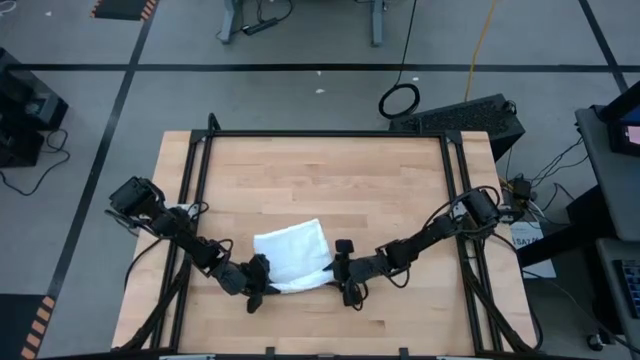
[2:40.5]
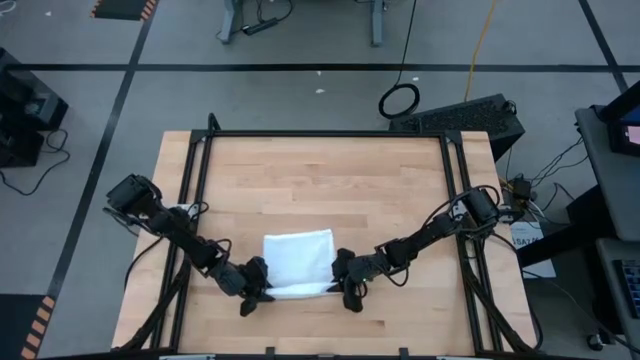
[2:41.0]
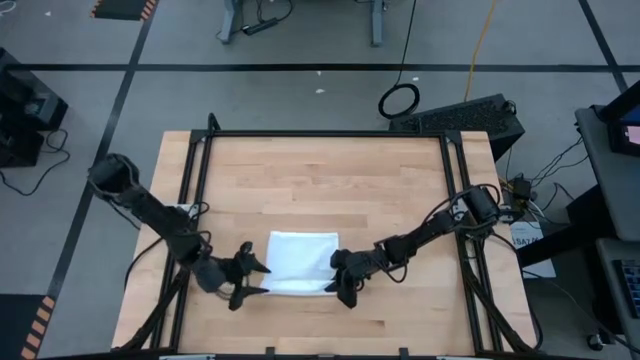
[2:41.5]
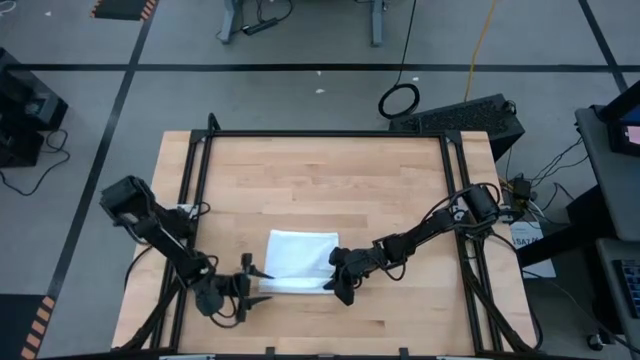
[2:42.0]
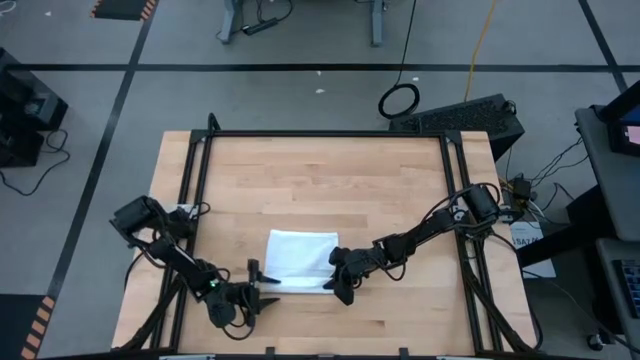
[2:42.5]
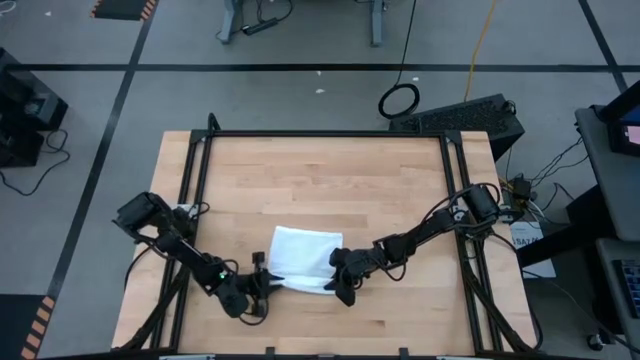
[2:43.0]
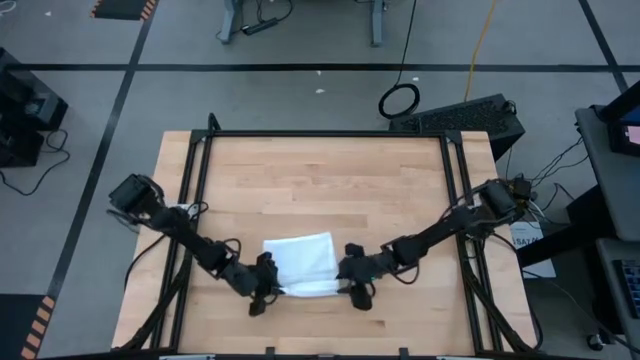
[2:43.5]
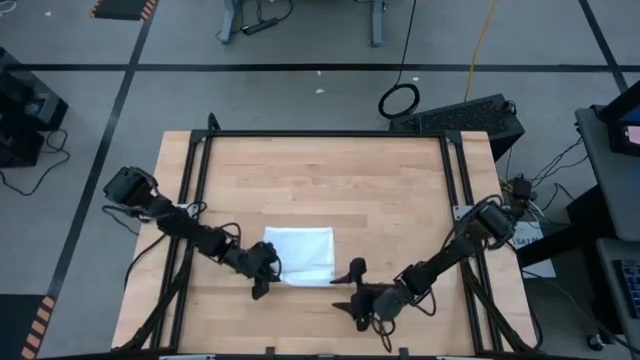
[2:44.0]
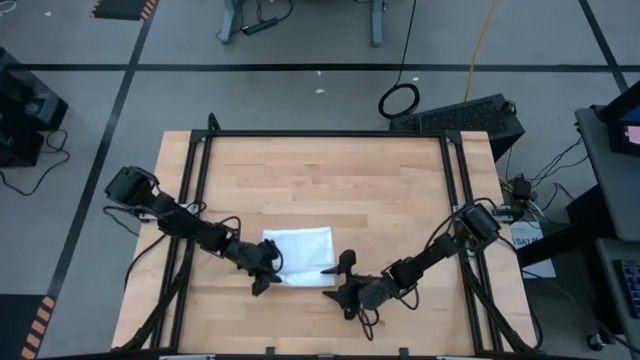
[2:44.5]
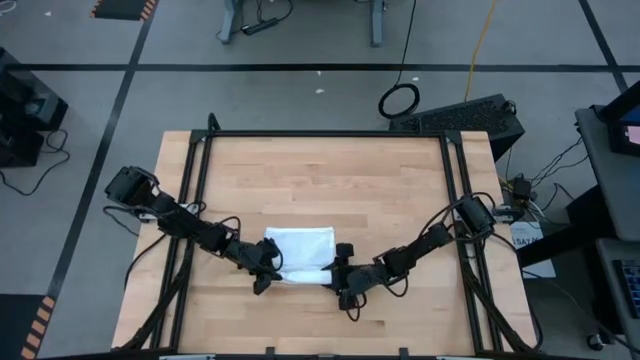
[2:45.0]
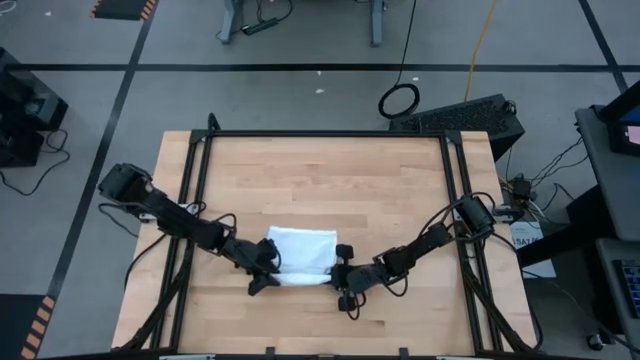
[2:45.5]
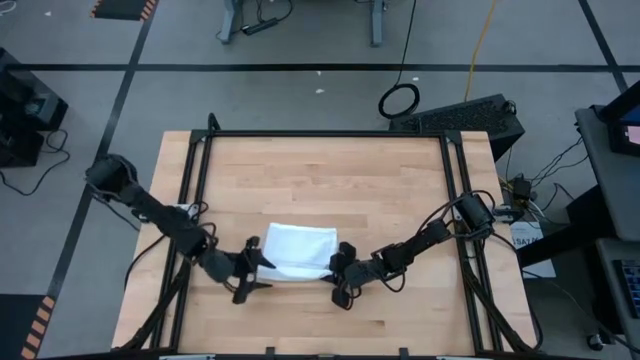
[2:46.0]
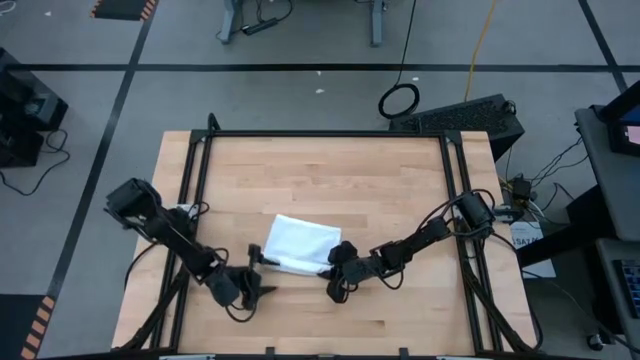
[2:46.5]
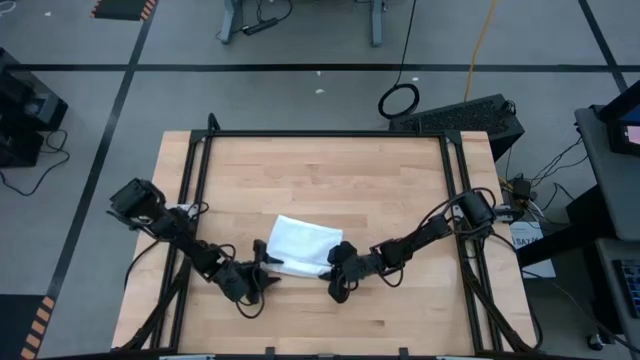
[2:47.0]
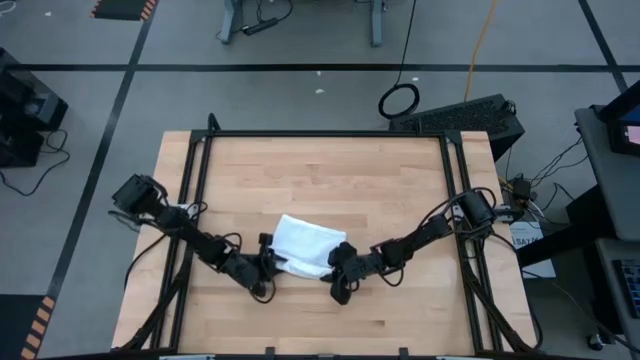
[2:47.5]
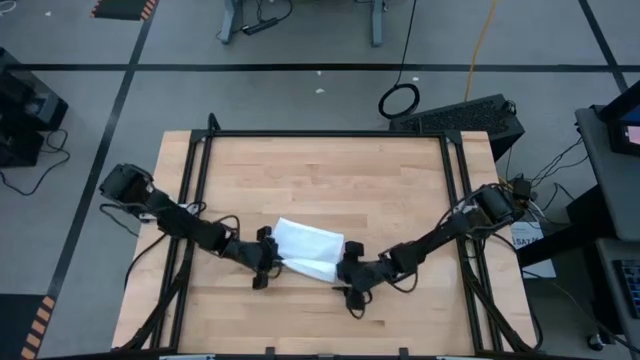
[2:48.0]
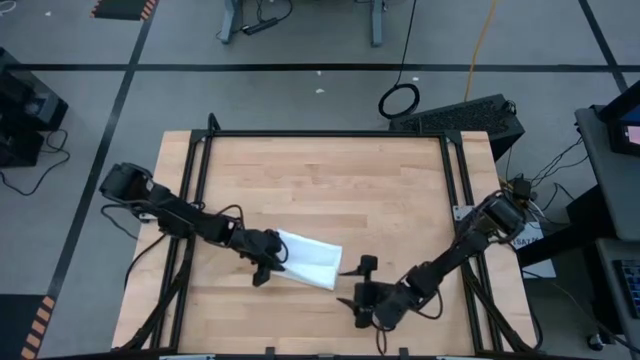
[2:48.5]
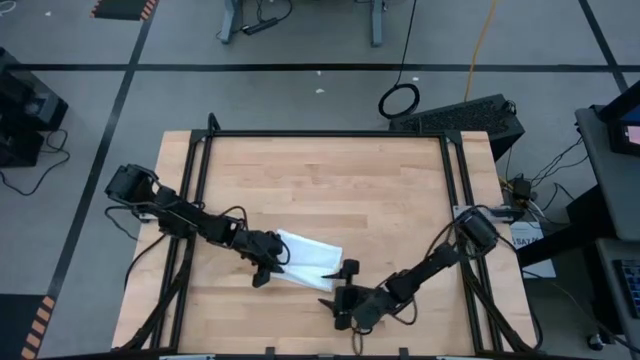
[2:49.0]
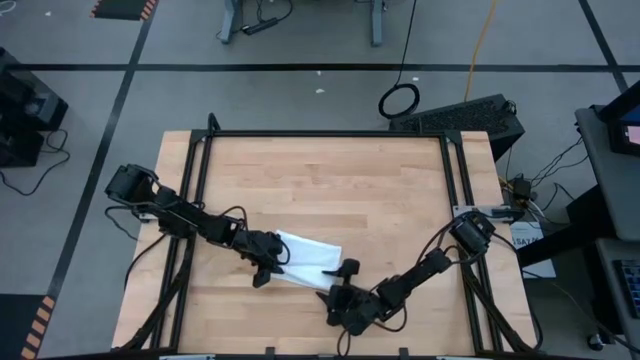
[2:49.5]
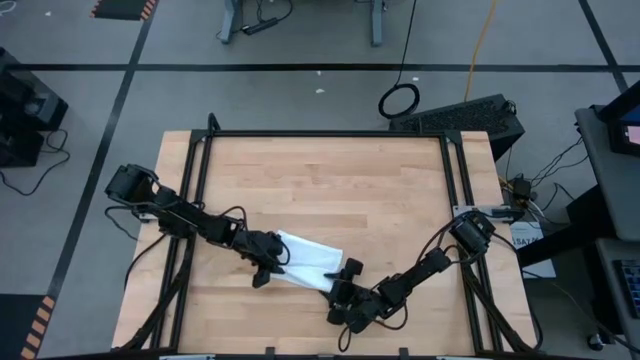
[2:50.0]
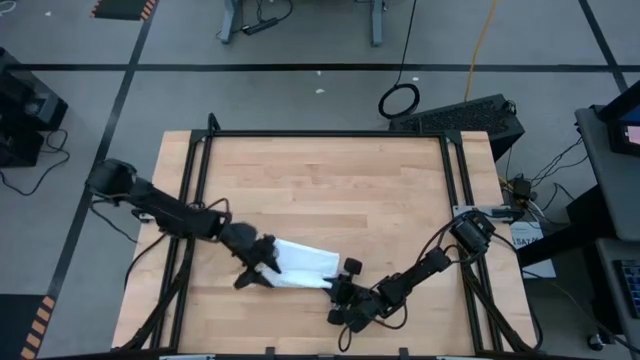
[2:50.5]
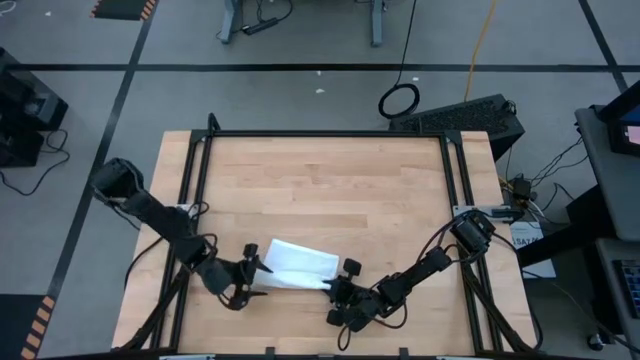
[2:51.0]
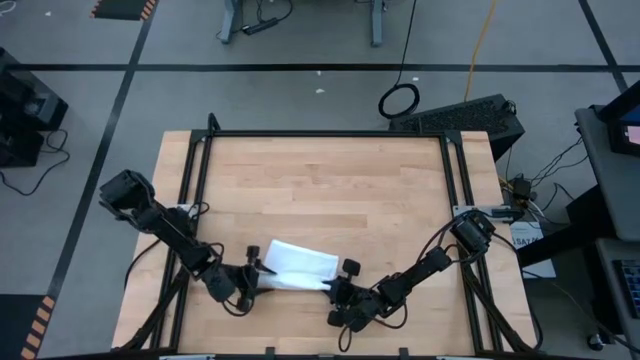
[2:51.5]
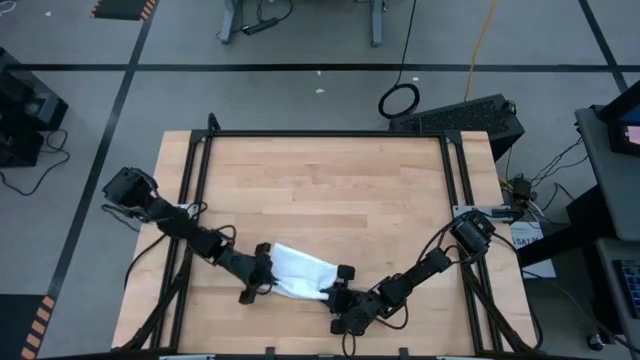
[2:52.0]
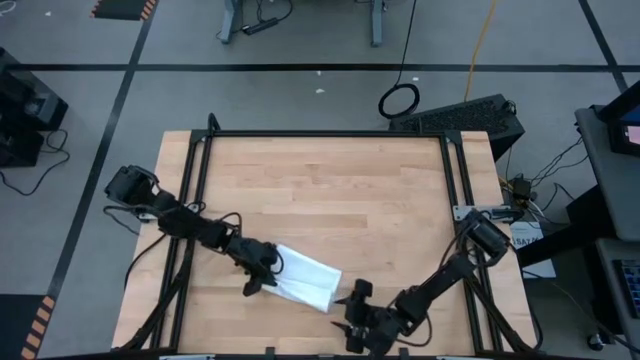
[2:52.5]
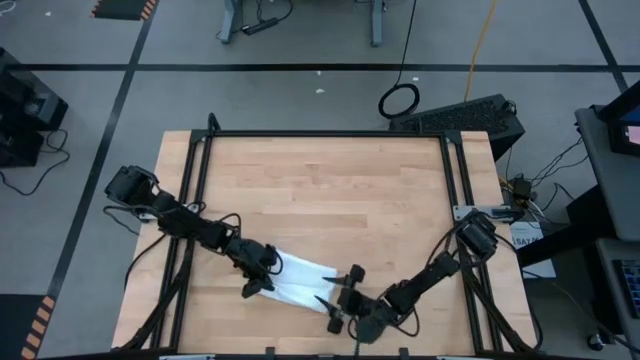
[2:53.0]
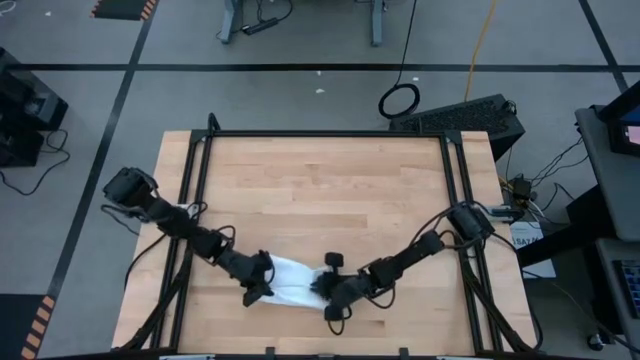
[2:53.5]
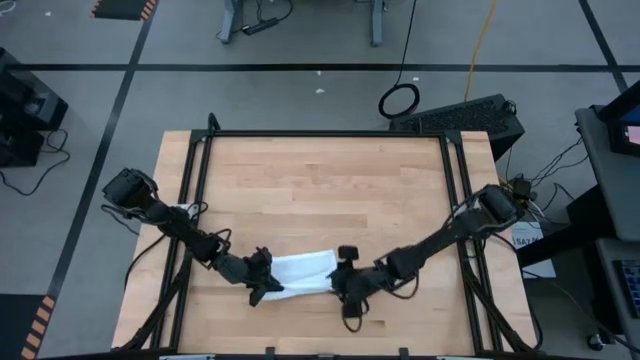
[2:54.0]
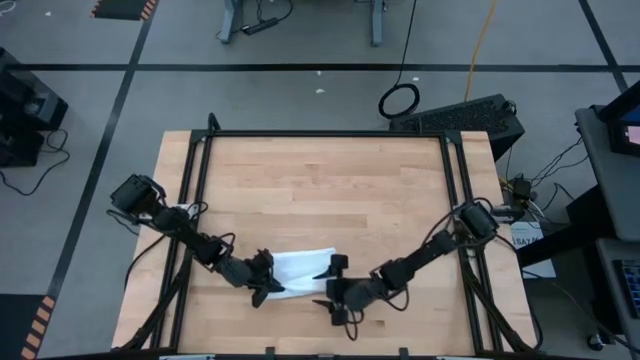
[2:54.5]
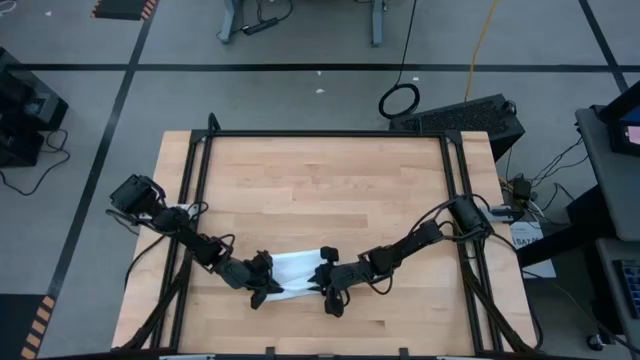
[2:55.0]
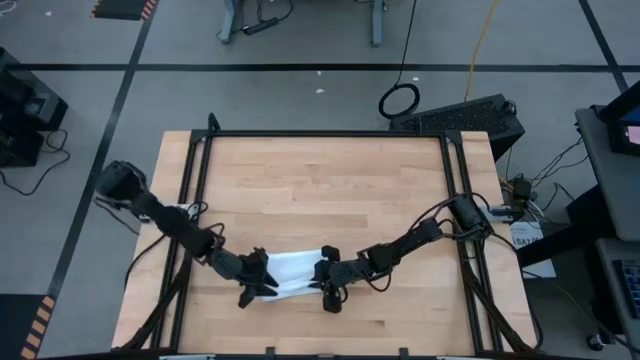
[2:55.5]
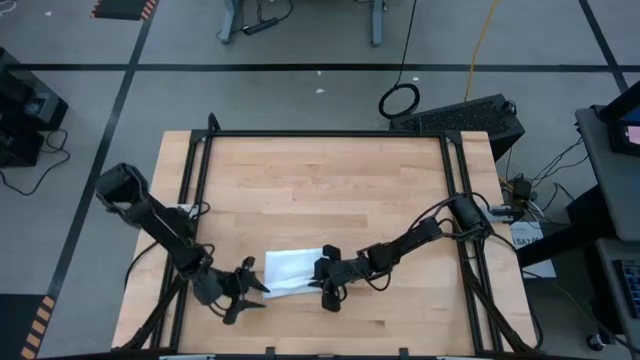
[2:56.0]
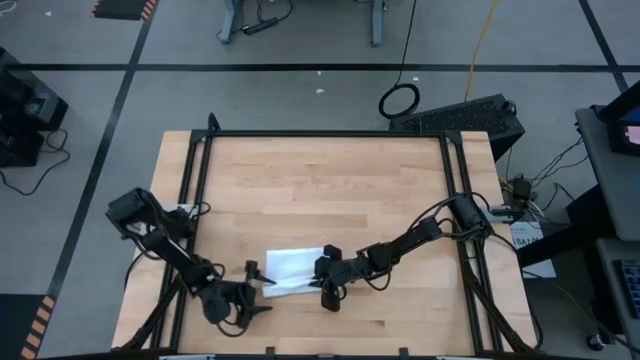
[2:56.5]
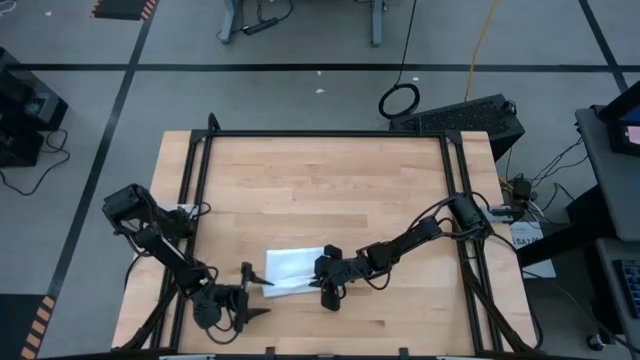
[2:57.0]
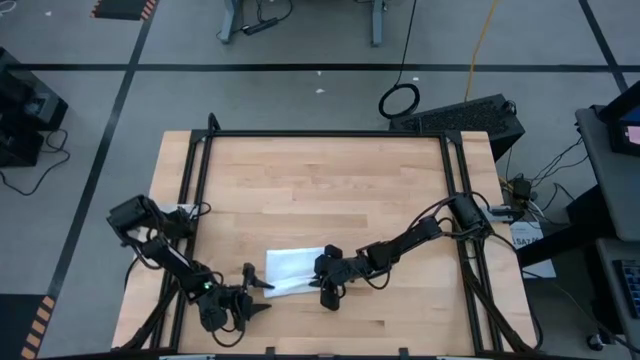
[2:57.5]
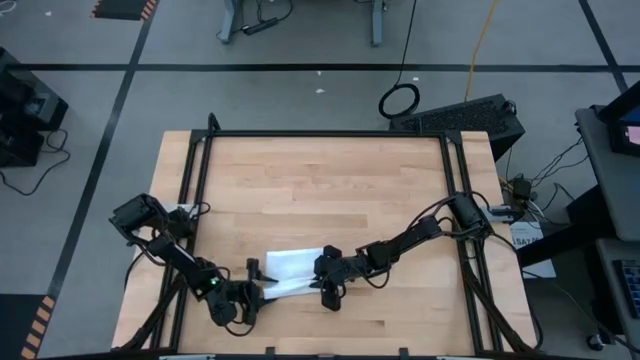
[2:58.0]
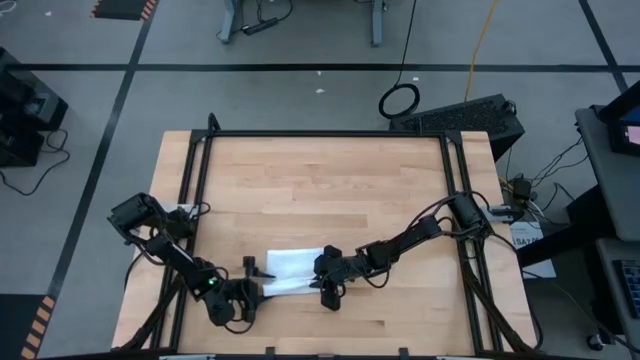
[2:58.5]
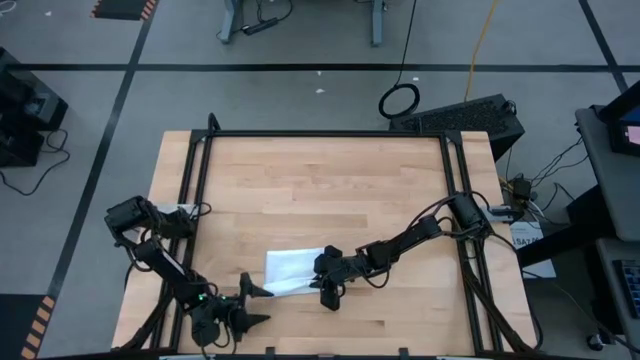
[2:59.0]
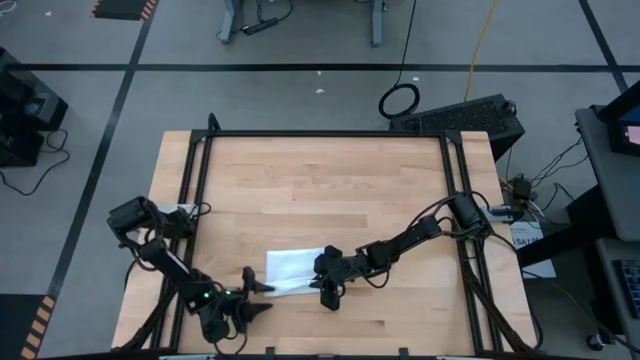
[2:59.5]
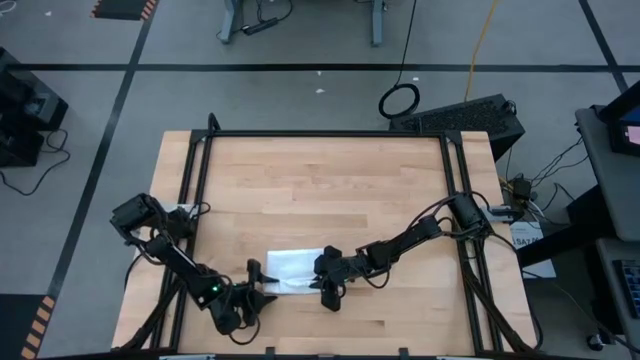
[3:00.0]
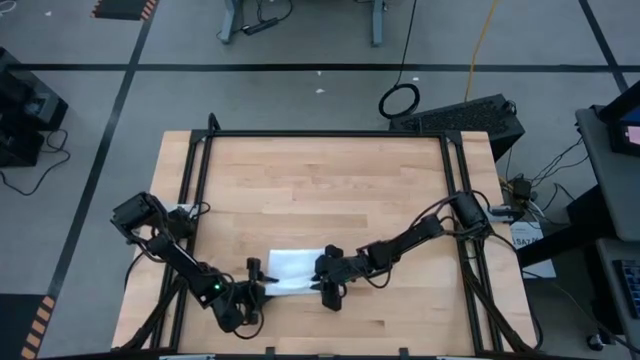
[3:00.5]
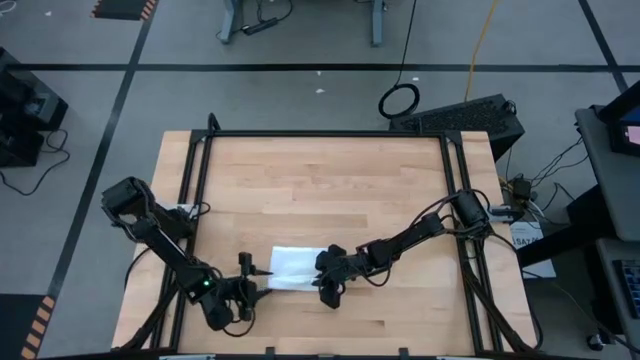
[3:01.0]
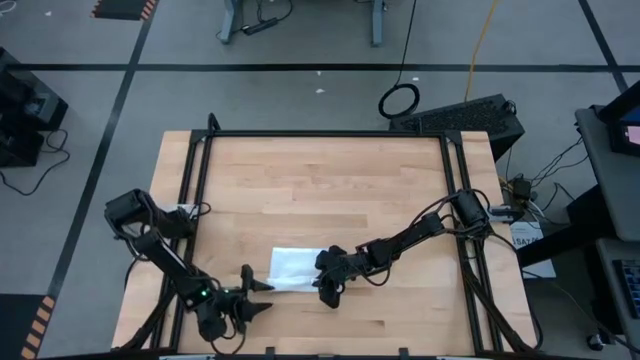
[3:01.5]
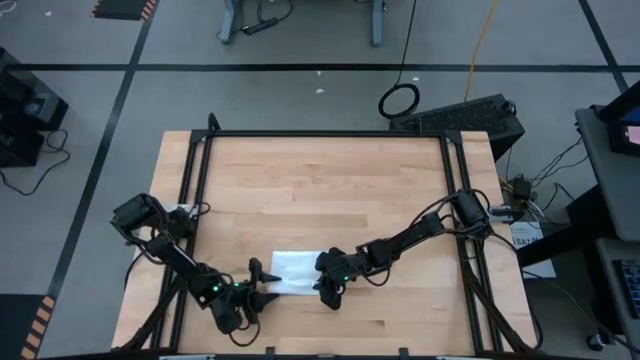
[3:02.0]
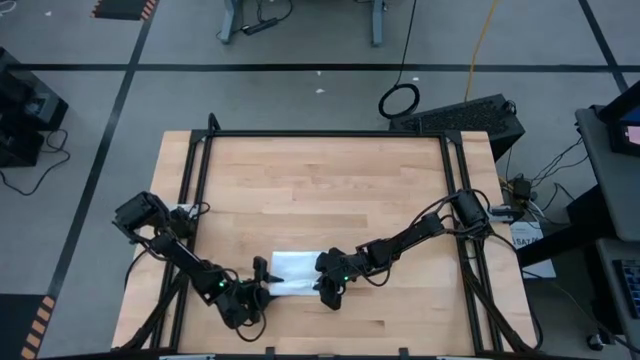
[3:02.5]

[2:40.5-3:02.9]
Task: Roll towel
Roll the white towel
